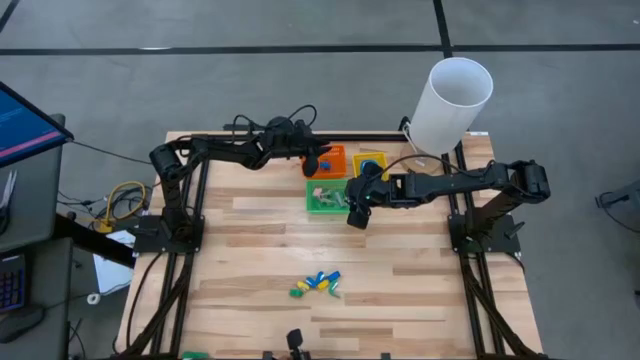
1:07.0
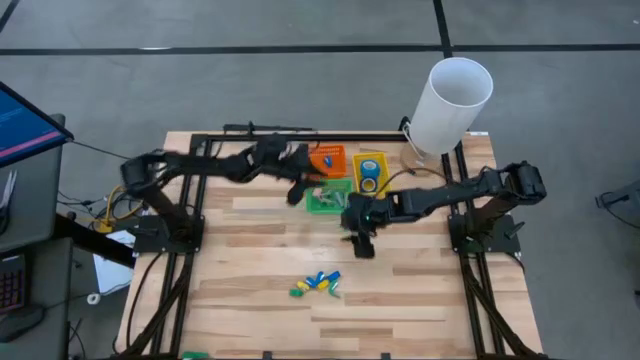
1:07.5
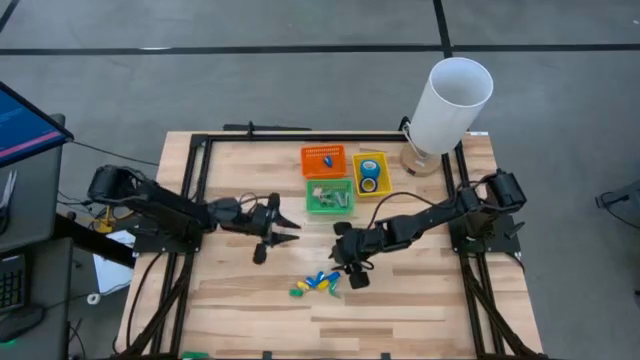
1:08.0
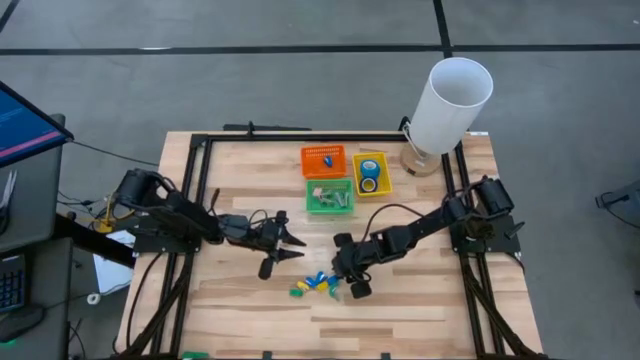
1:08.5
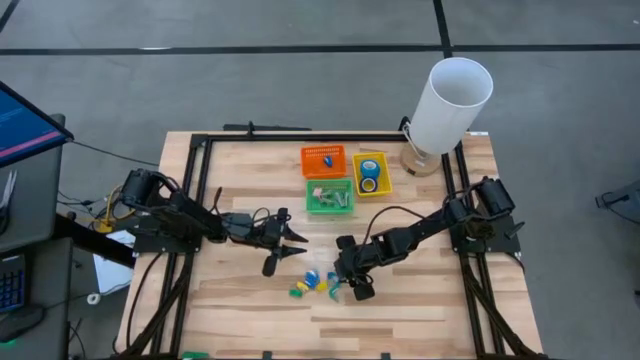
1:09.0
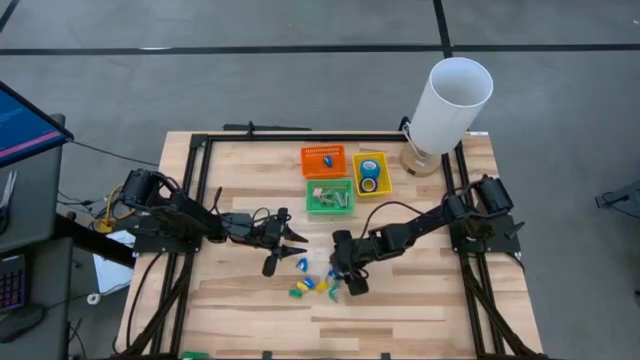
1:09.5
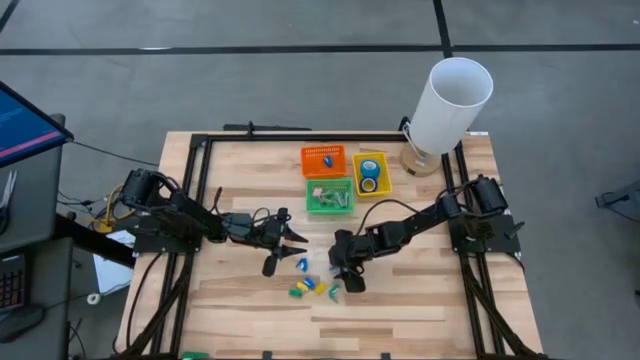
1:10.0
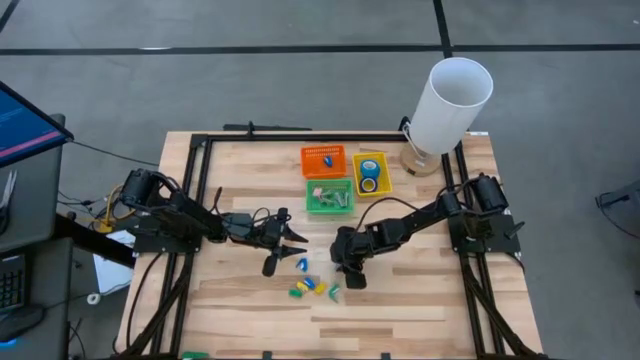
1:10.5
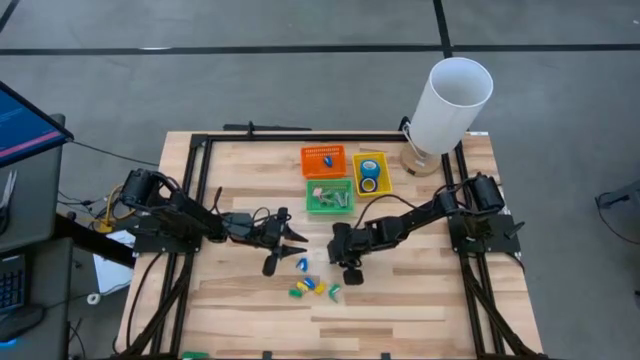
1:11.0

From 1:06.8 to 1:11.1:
Task: Pick and place Stapler, Stapler remover, tape
Put the blue stapler into the orange bin

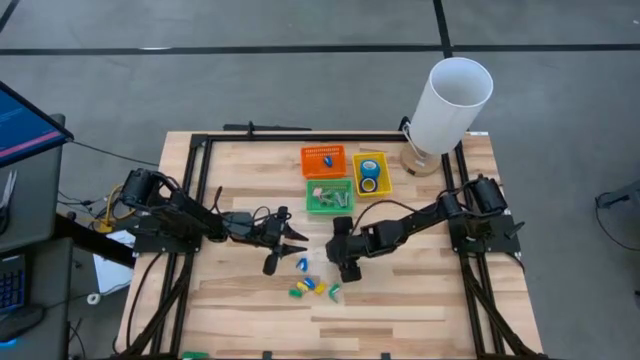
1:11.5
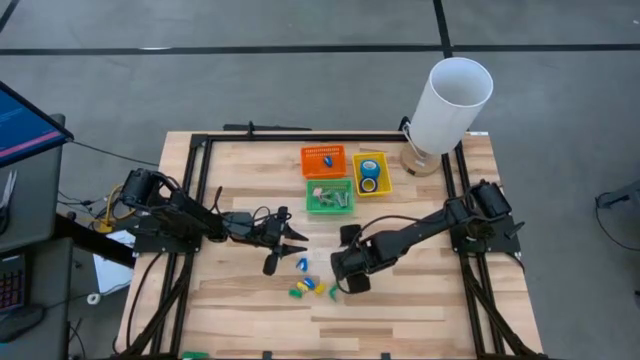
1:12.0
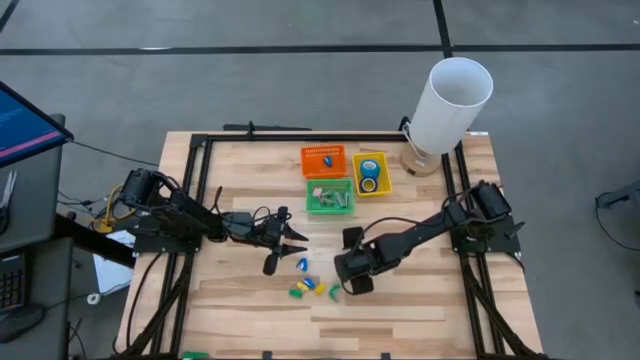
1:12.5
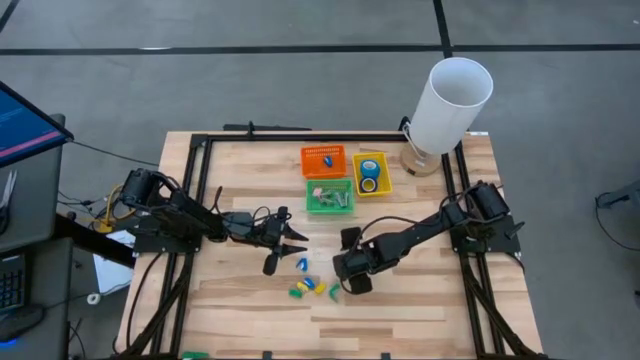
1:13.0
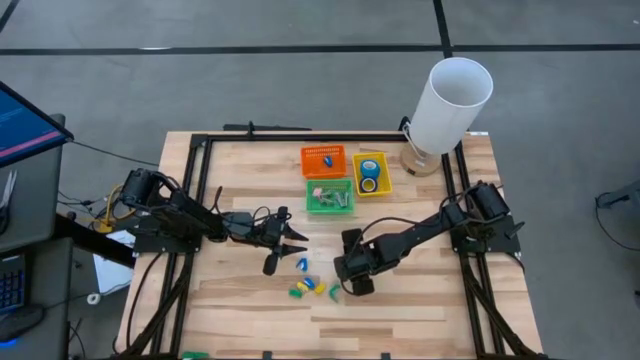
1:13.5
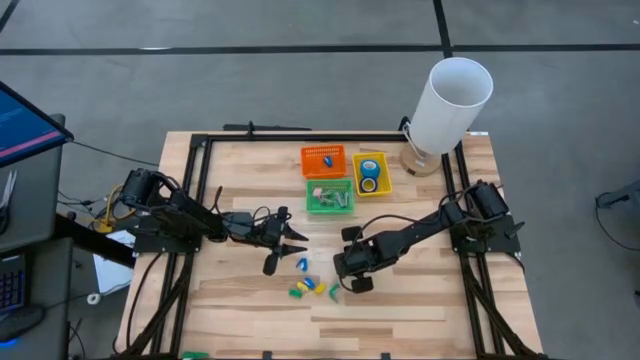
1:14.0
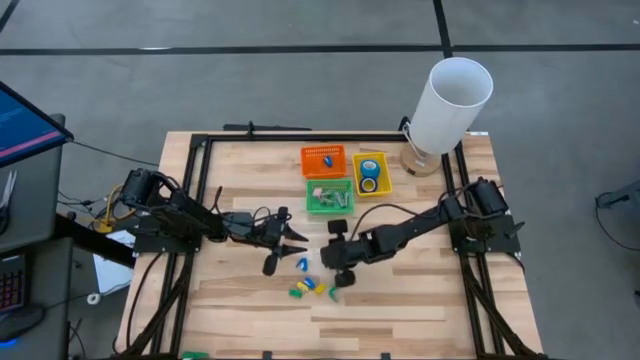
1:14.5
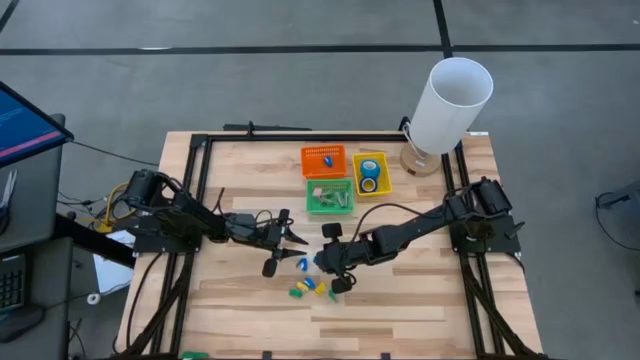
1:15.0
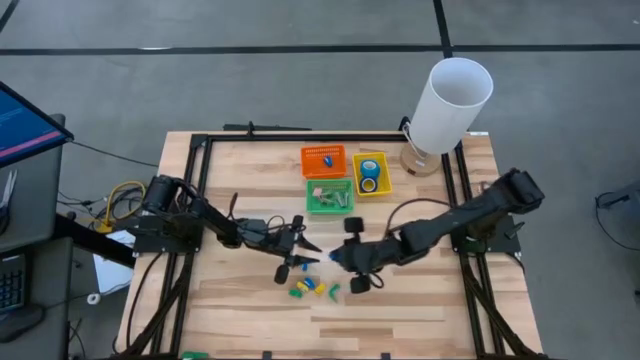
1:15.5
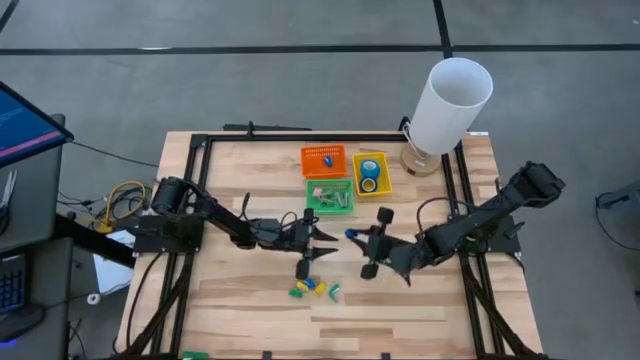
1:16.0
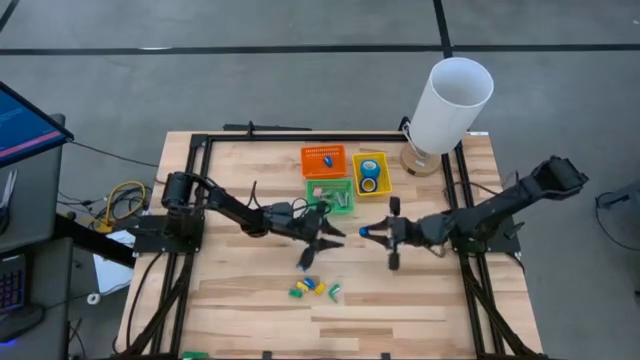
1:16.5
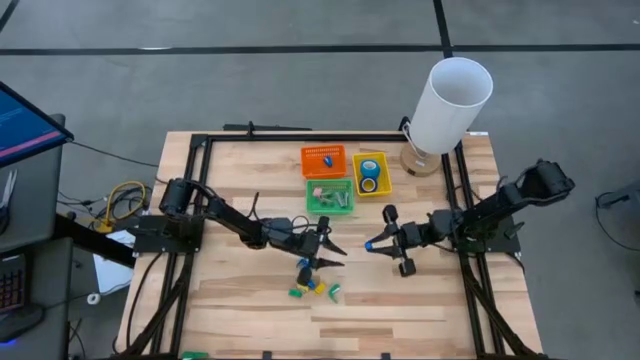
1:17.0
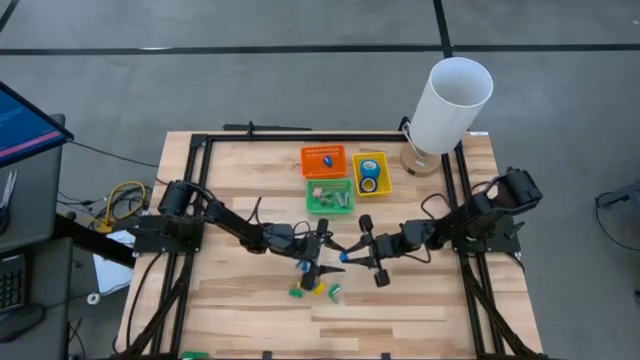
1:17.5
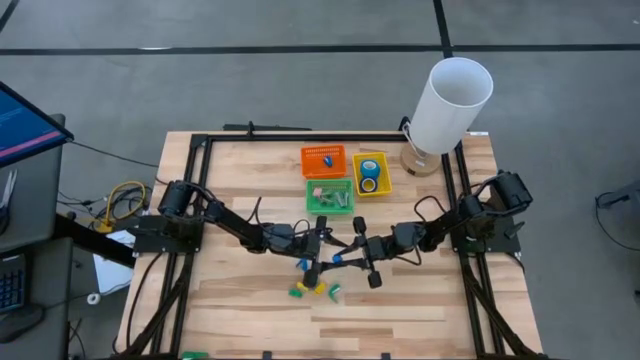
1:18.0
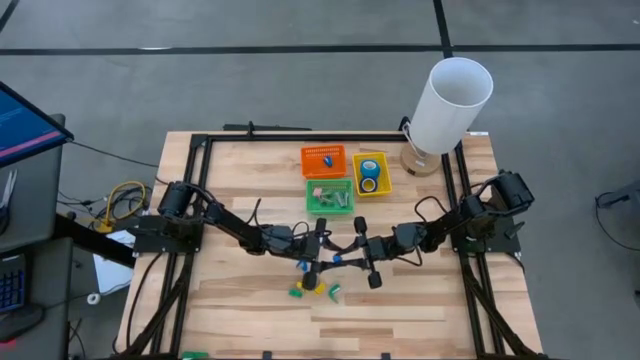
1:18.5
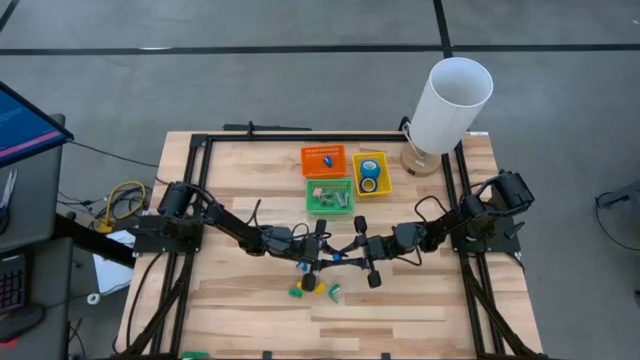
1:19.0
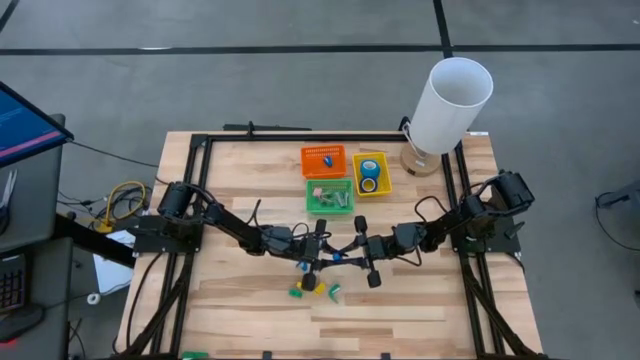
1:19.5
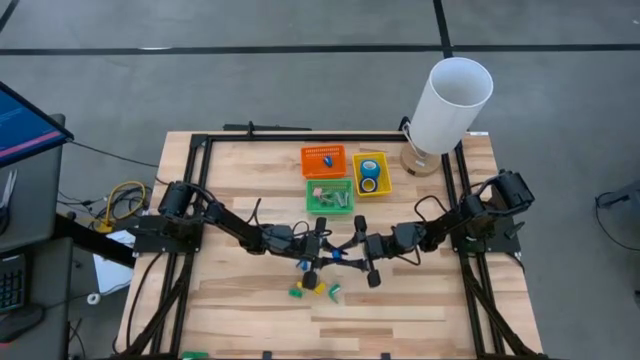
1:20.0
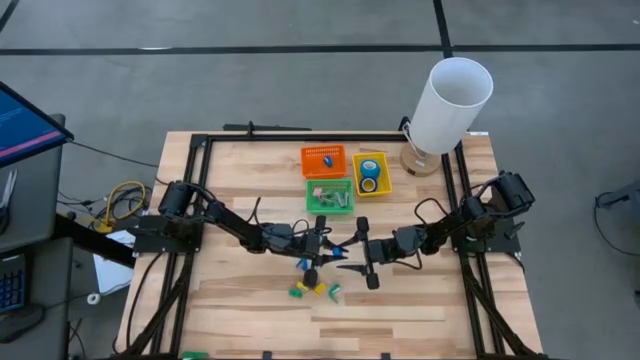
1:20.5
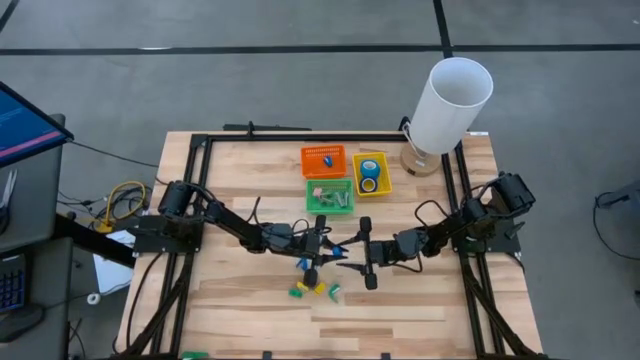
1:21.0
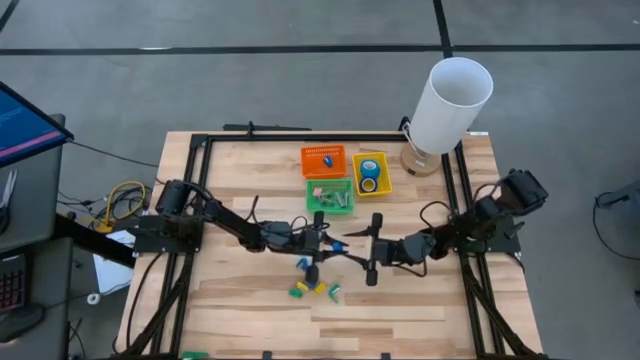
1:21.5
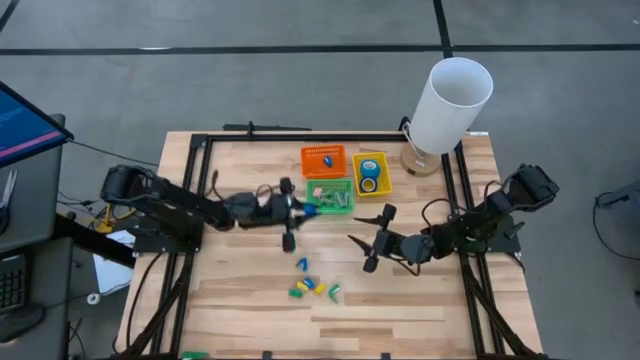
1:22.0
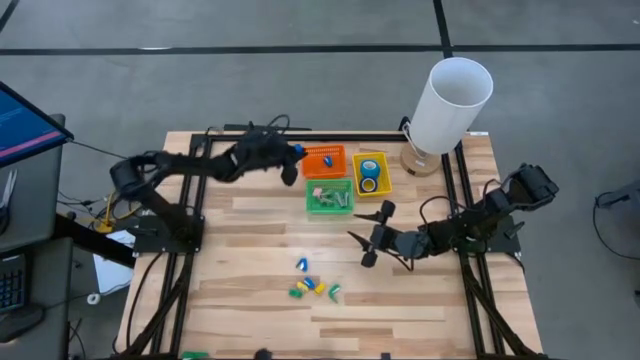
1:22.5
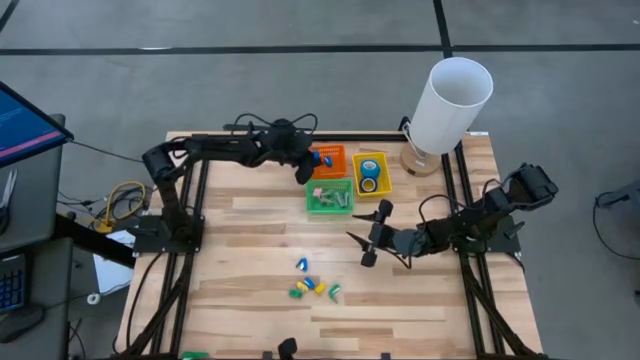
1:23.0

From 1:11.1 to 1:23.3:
Put the blue stapler into the orange bin

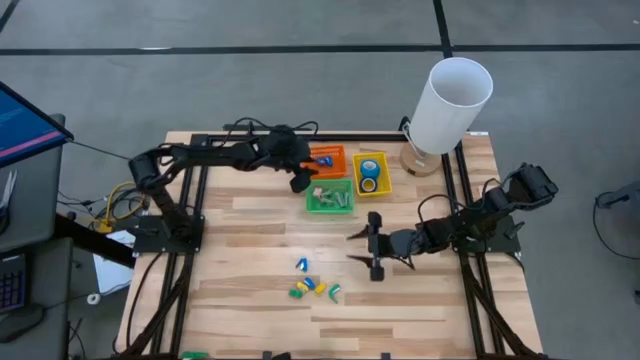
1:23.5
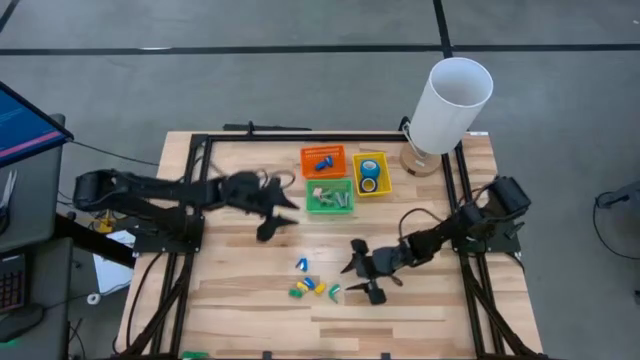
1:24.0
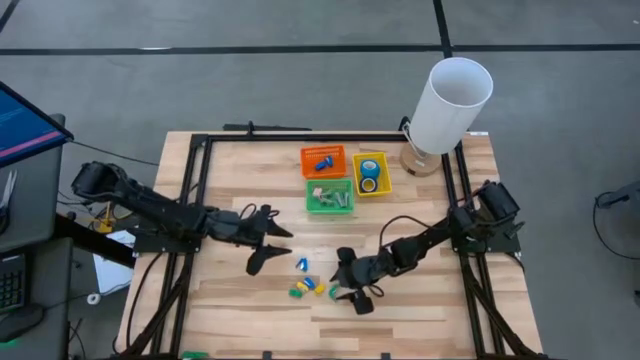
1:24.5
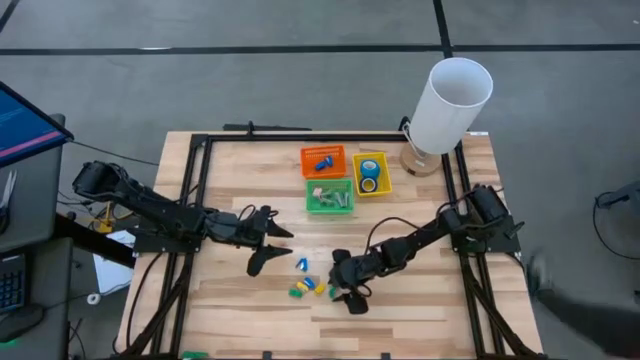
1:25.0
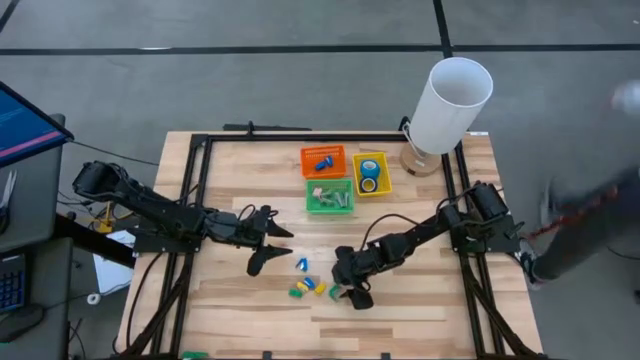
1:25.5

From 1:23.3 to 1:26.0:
Put the green stapler into the orange bin

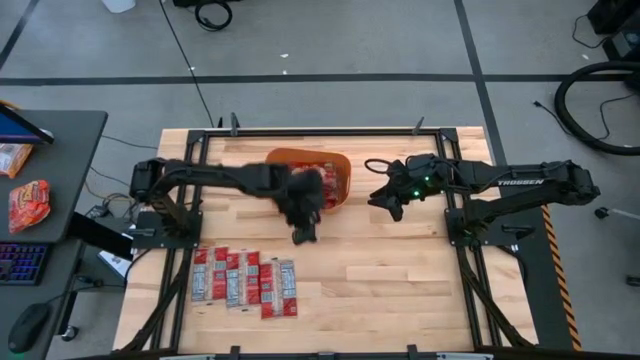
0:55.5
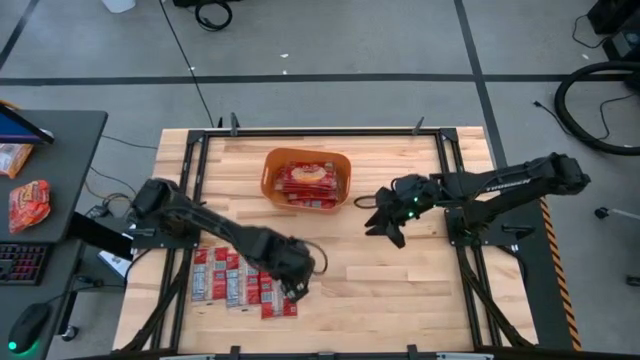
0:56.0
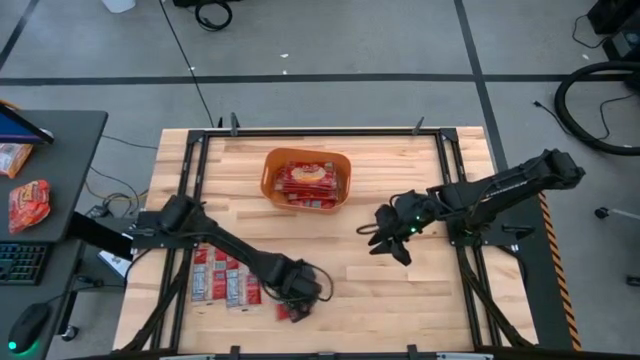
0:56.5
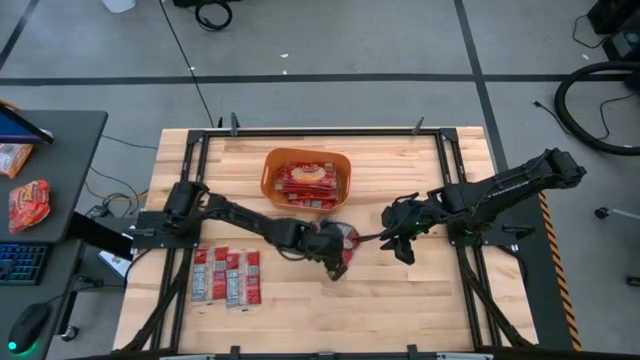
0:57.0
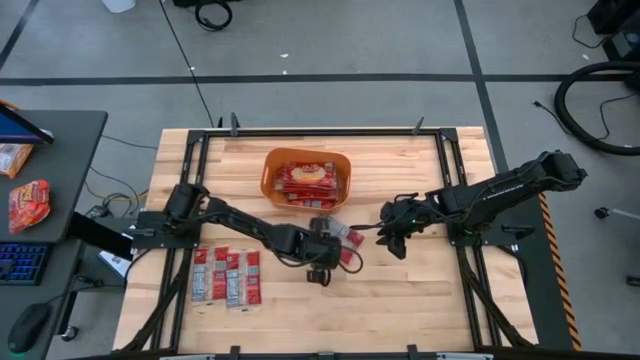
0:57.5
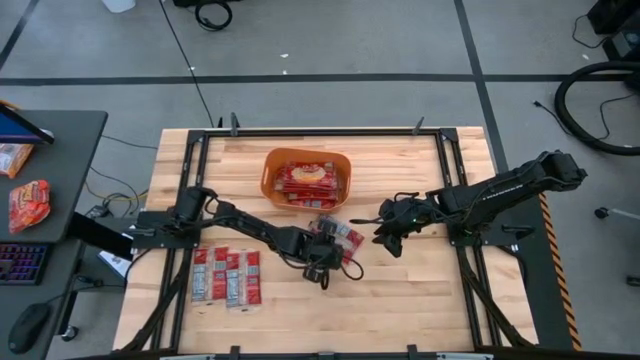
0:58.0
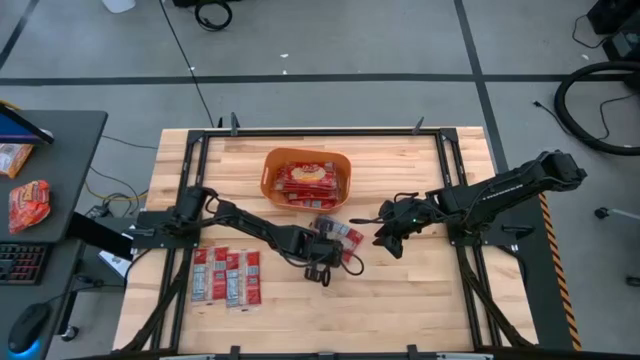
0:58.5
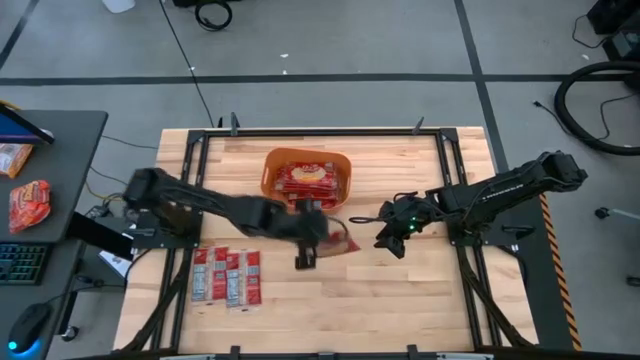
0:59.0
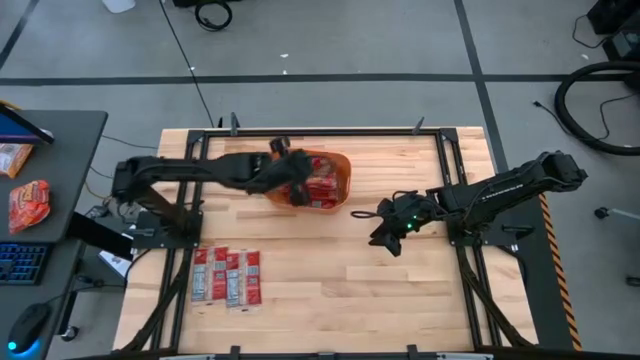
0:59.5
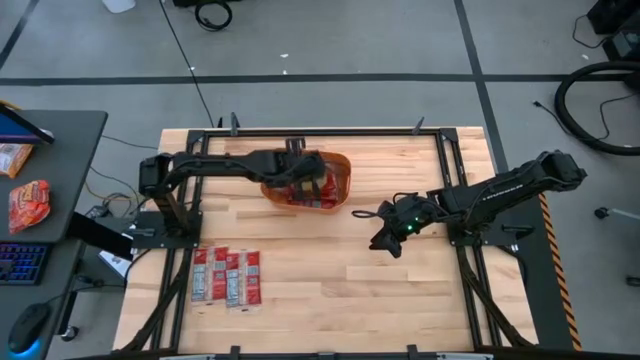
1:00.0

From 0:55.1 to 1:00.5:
Task: Sort popcorn bags into baskets
Put the red popcorn bag into the orange bin
